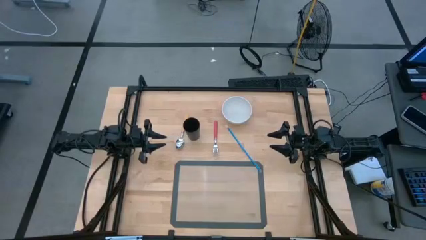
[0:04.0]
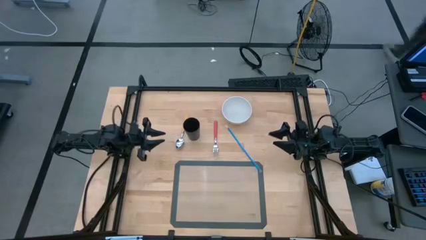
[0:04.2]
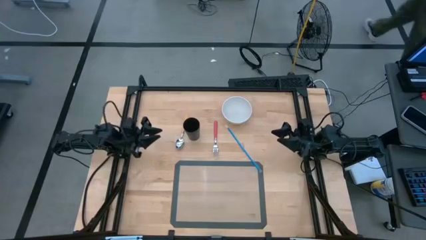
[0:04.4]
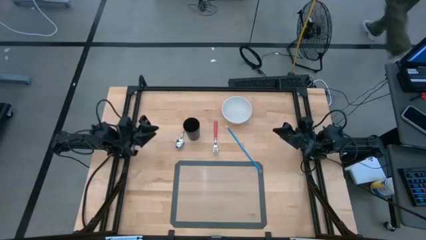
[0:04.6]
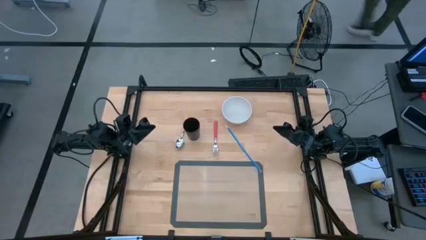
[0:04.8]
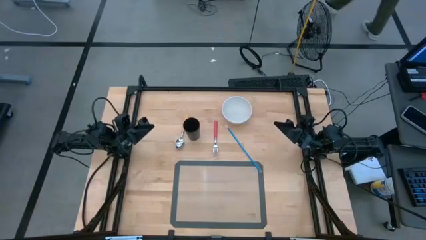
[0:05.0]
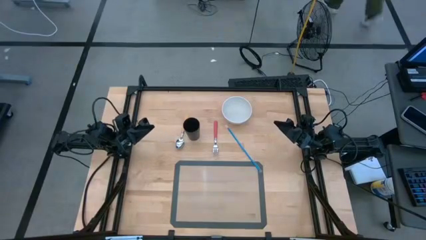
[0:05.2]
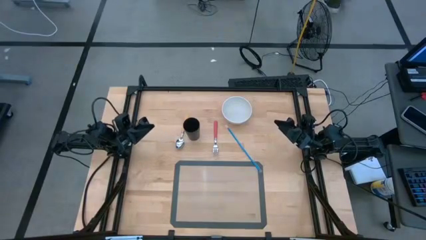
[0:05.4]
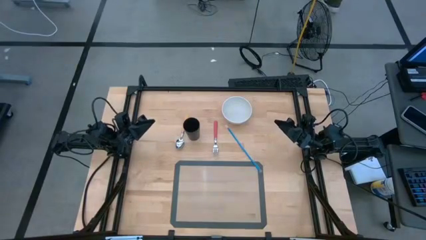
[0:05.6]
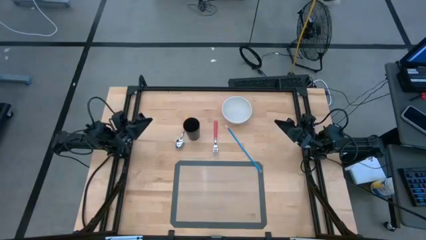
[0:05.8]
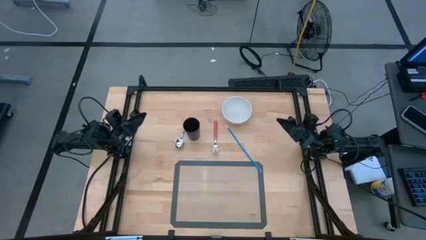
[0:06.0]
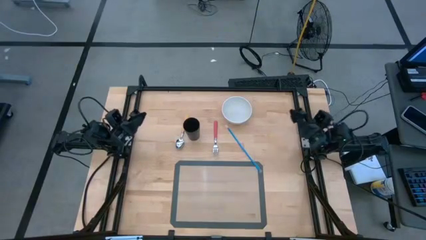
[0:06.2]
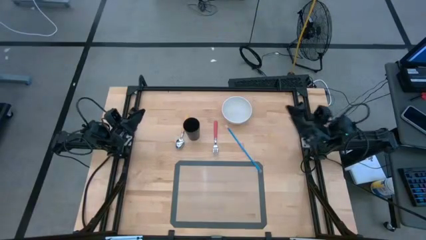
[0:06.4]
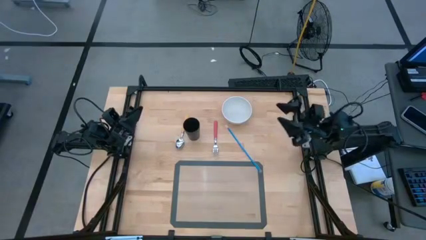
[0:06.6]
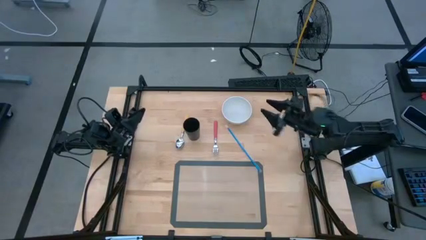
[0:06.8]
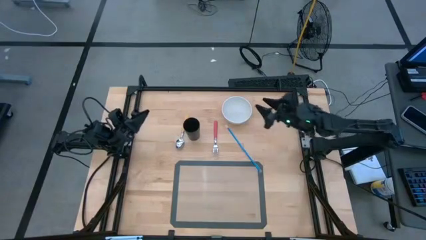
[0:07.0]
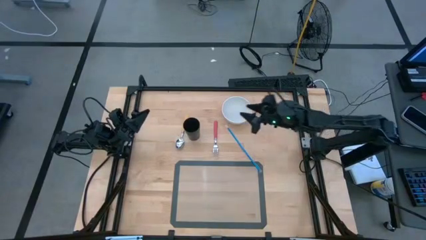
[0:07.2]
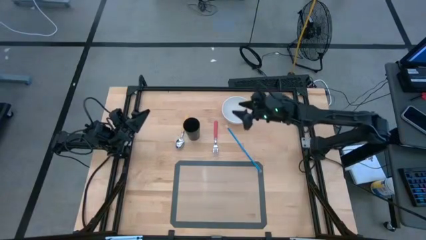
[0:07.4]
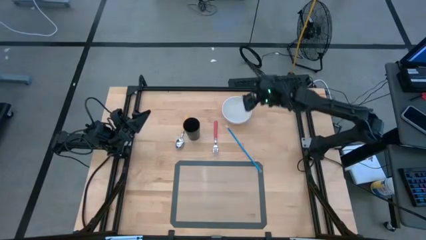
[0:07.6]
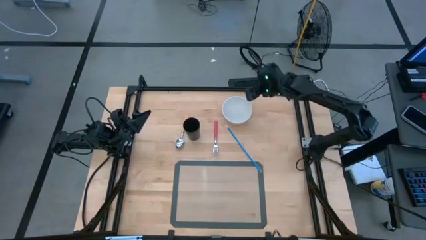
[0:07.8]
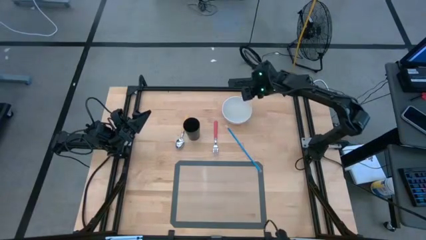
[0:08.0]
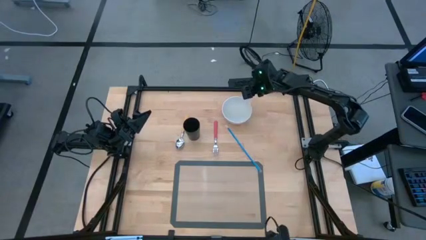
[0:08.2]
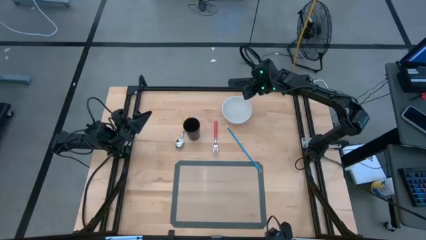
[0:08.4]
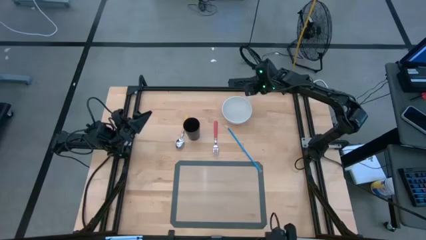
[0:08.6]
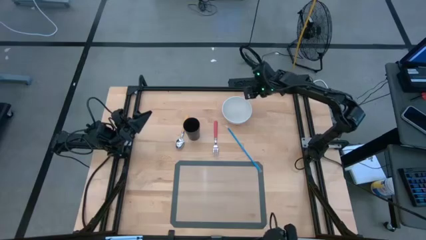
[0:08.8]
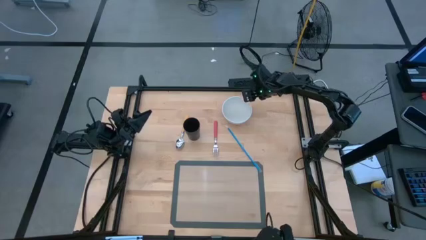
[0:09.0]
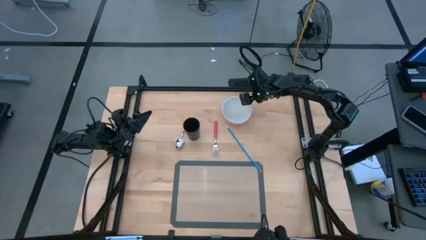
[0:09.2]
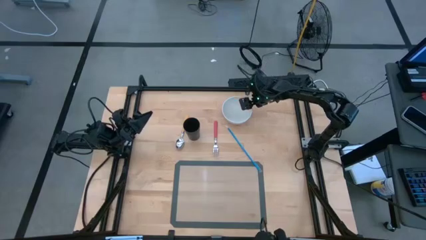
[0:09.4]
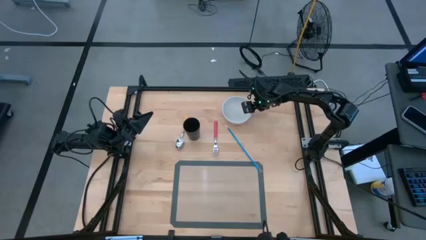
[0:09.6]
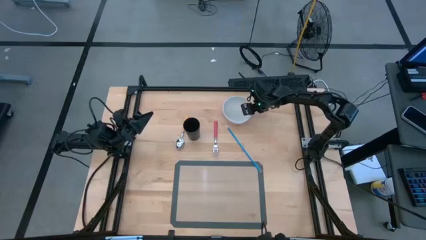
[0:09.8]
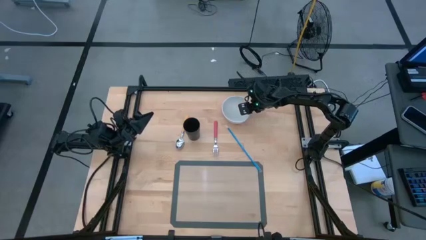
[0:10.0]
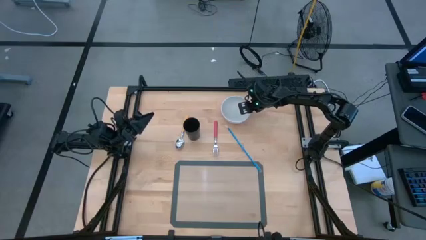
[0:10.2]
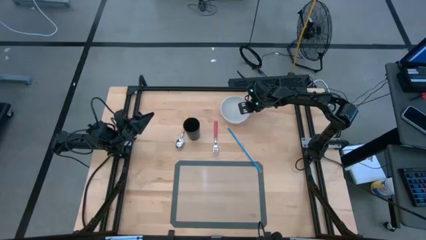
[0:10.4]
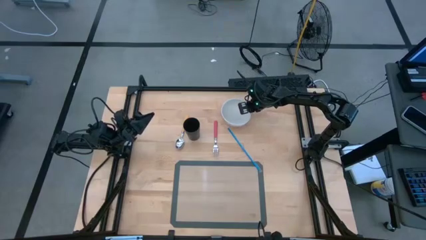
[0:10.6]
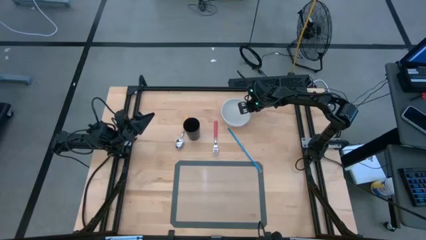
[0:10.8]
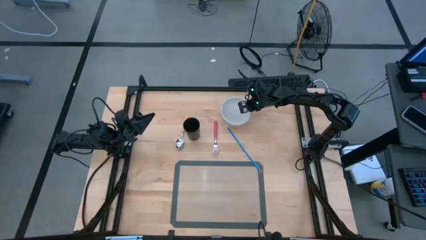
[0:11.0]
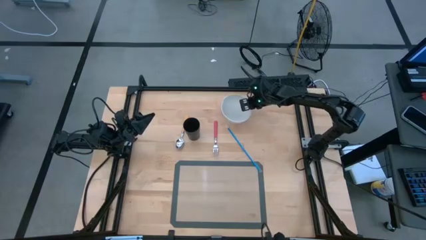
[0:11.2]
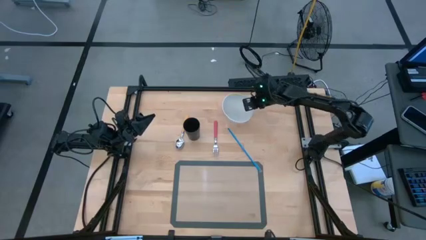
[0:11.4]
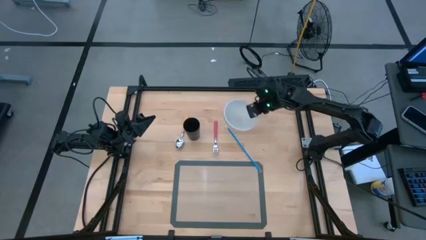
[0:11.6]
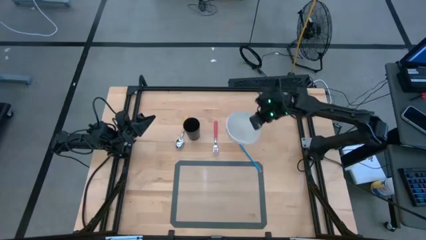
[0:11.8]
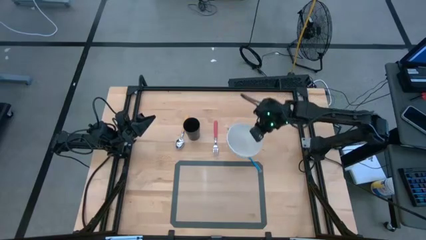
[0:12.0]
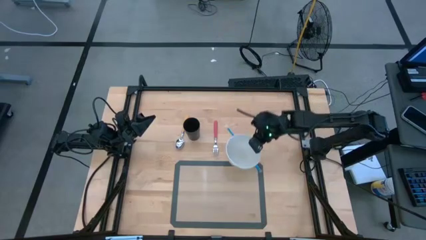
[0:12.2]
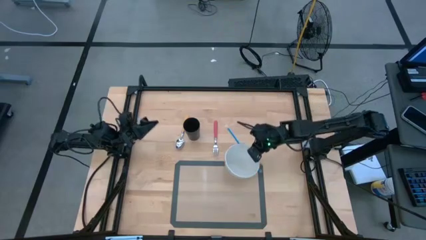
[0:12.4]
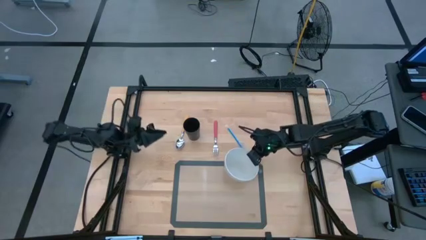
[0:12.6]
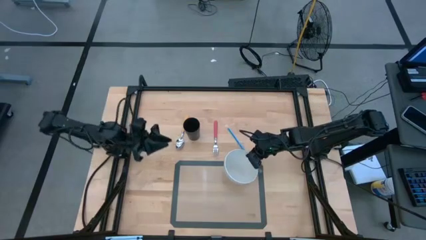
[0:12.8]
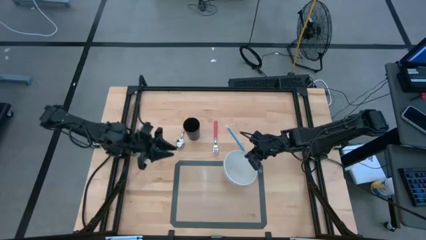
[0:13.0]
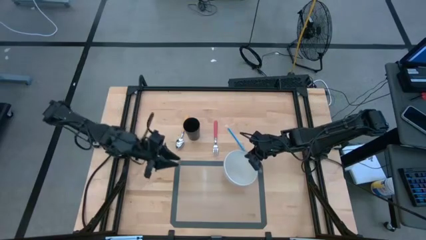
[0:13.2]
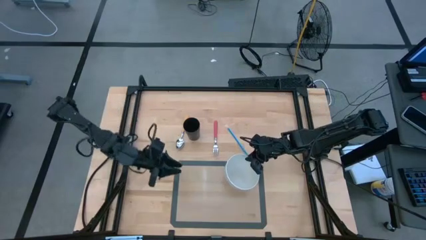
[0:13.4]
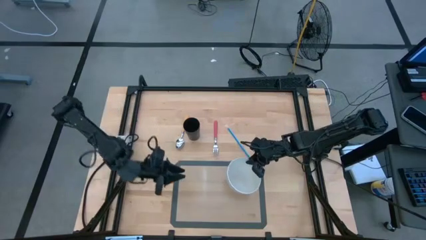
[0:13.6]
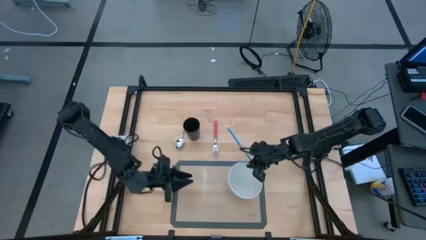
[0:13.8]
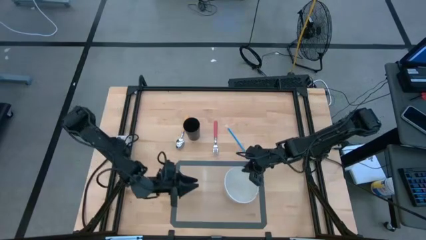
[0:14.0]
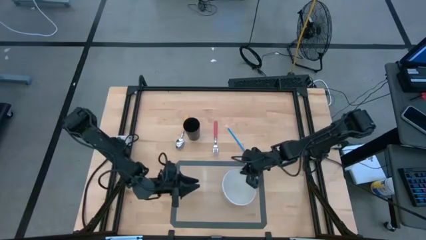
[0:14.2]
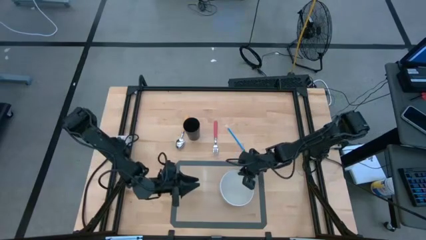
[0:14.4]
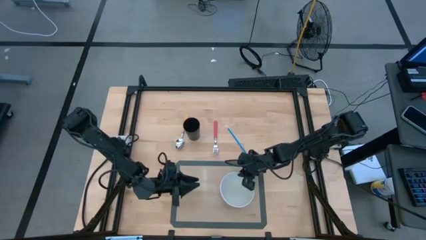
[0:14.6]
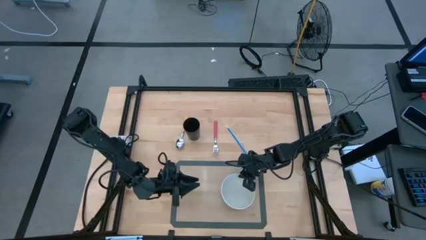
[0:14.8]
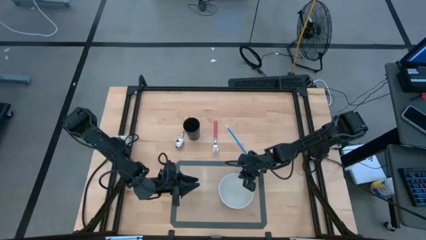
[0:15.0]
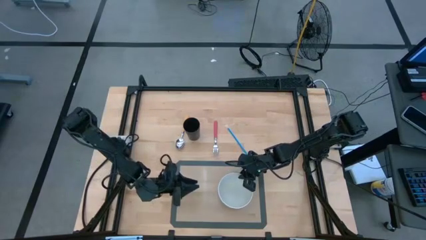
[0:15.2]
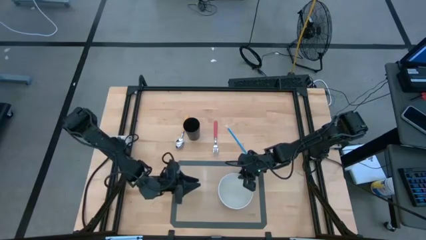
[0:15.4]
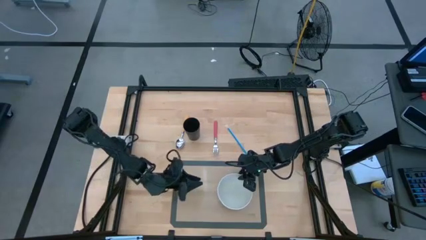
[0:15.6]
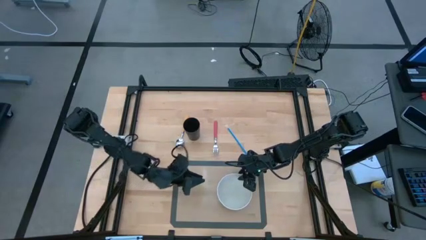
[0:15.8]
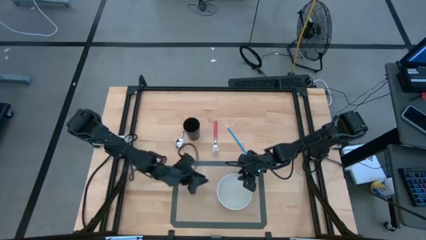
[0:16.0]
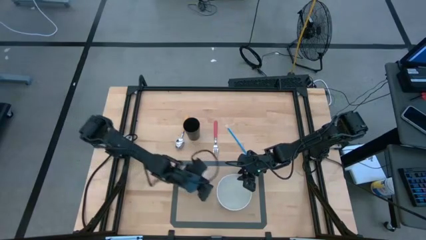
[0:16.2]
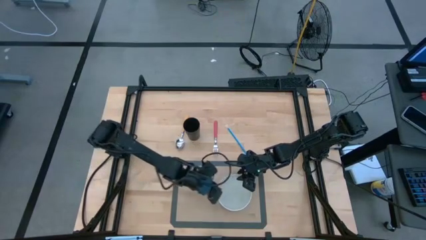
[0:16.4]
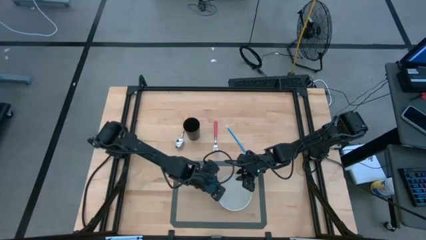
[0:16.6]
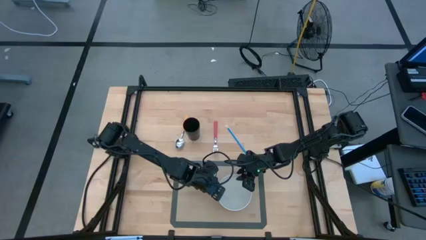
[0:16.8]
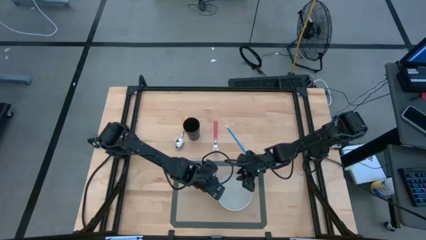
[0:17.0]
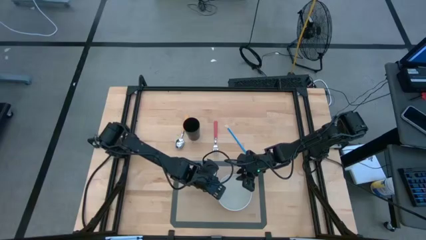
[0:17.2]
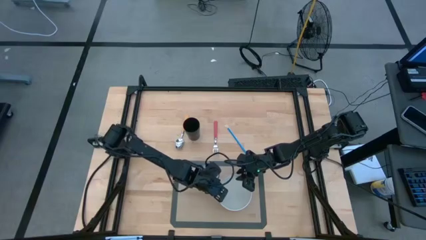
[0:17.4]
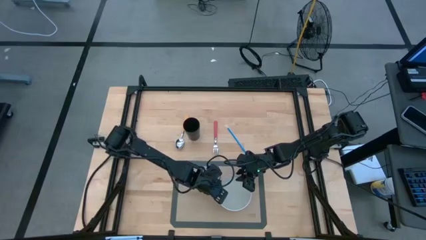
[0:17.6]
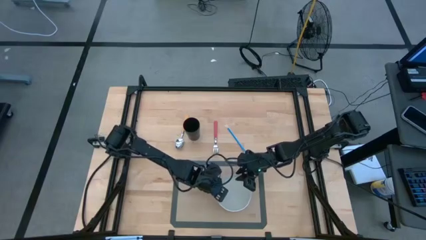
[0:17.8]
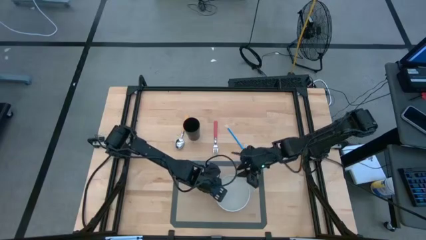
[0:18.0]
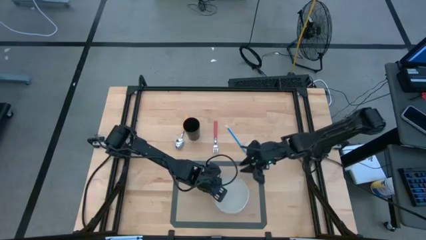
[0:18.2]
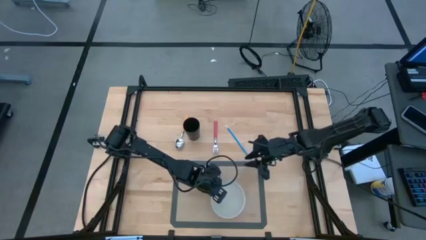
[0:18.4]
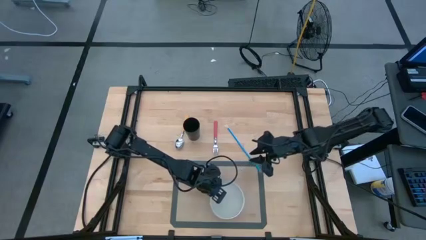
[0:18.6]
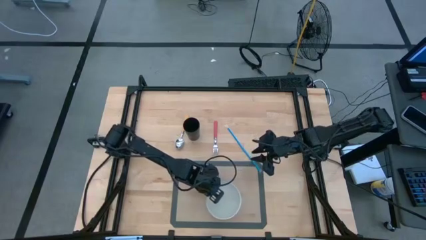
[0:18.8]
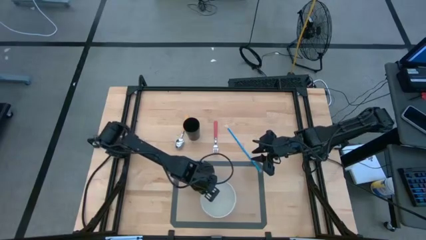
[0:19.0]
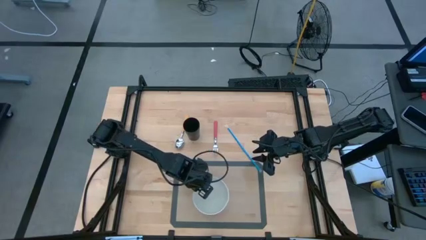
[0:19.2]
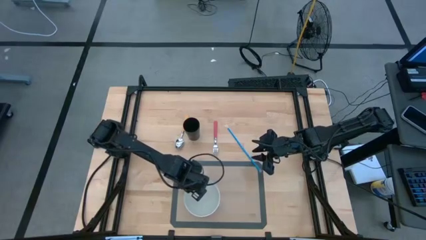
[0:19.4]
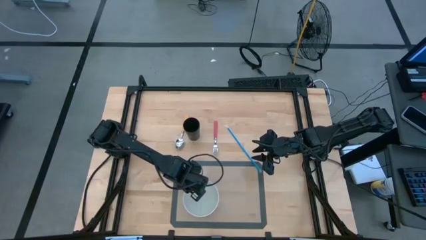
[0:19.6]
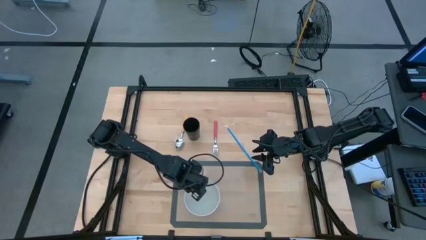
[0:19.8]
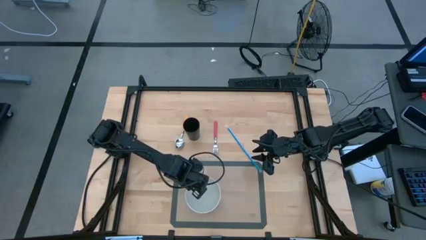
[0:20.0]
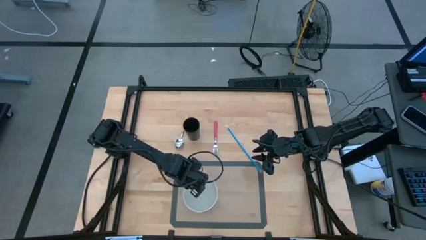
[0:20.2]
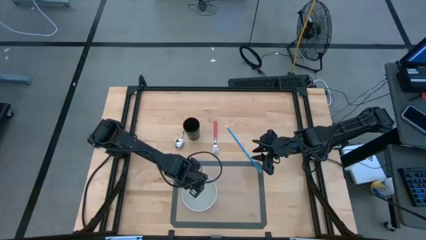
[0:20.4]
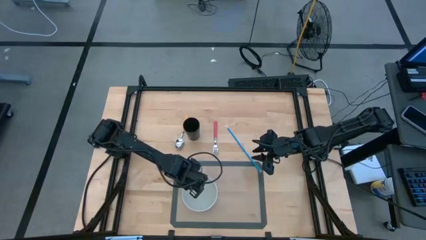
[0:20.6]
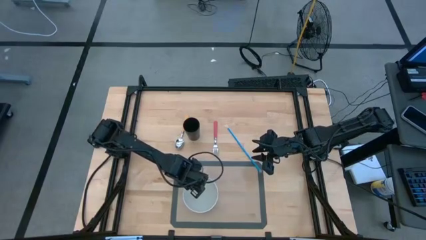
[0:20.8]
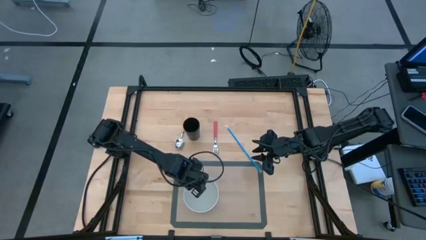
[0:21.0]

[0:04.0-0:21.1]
Task: Pick & Place Utensil
Put the white bowl on the mat
